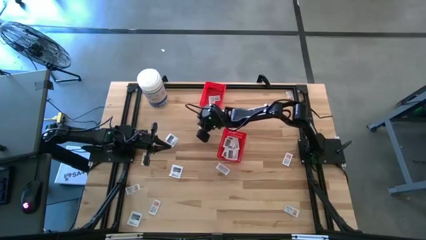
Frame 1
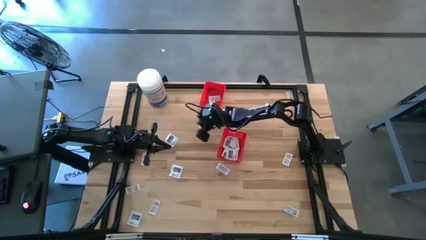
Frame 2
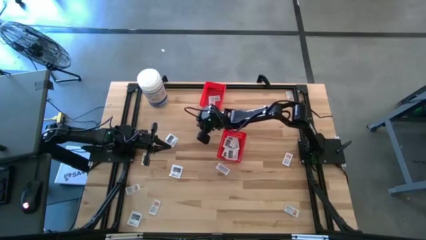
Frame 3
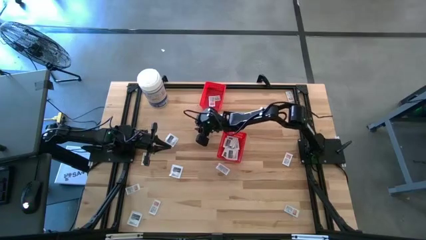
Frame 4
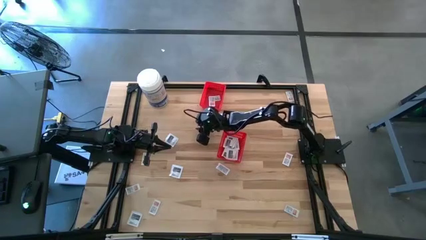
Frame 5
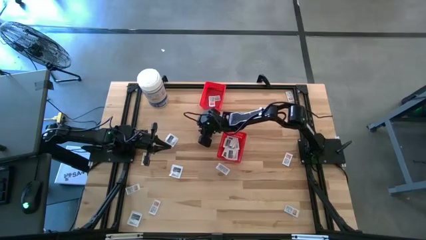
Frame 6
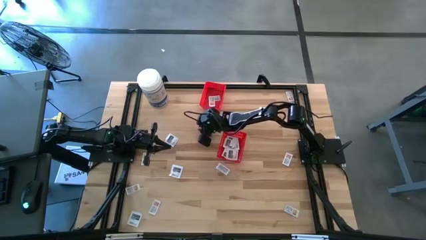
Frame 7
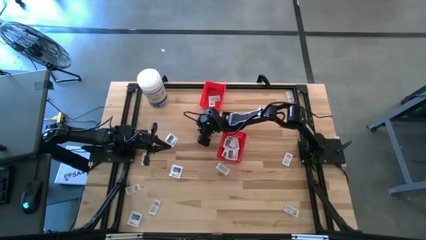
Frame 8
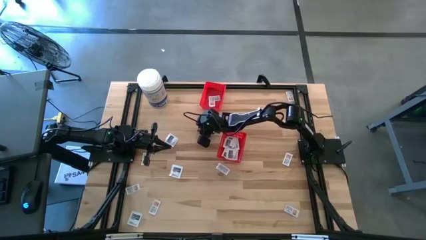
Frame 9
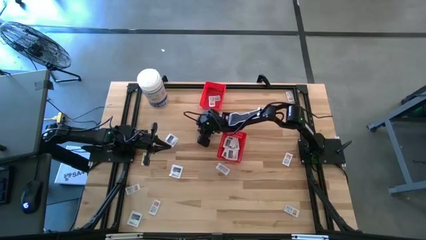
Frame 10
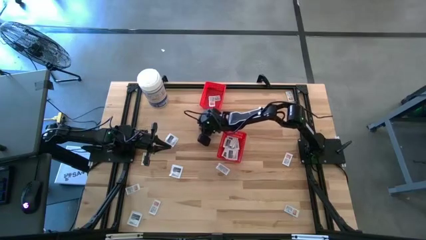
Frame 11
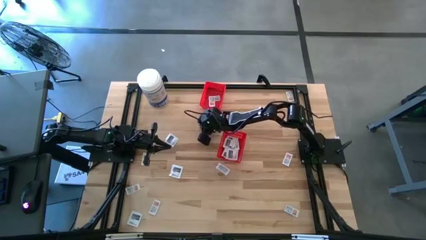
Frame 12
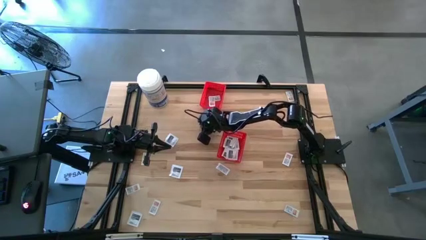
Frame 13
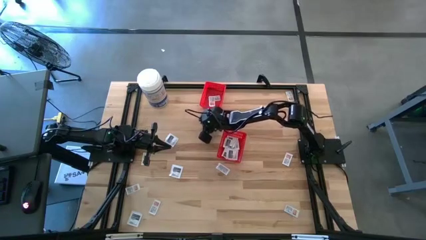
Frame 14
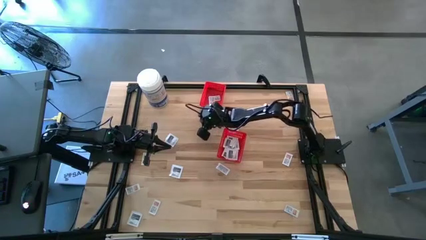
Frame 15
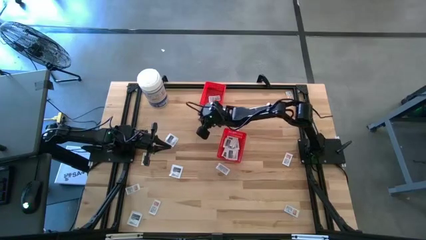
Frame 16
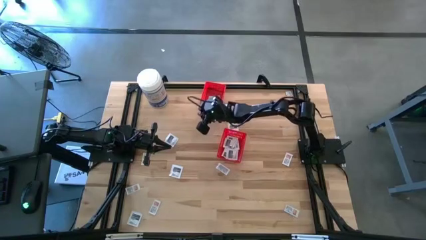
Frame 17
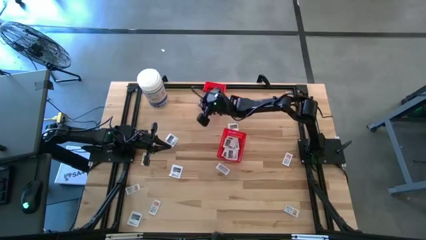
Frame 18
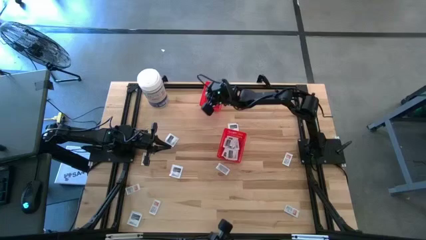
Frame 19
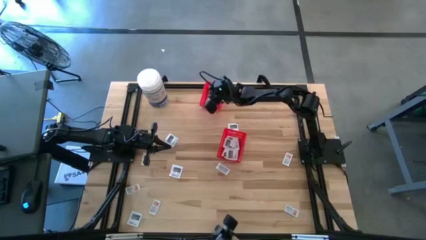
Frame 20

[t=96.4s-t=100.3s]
Task: Pick & Place First Aid Supplies
Put the white ointment pack into the top red bin

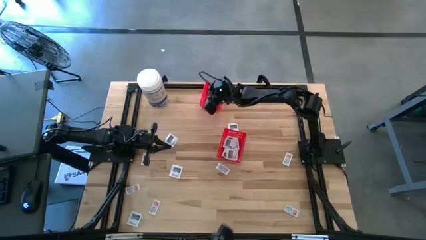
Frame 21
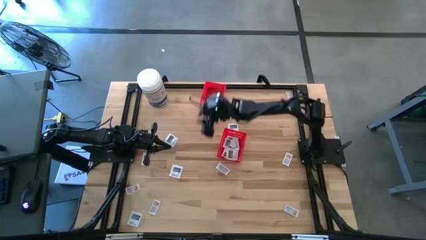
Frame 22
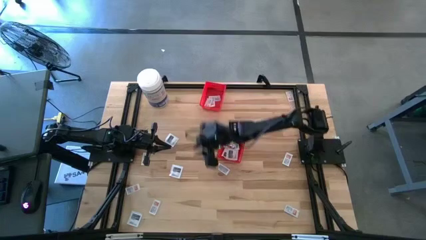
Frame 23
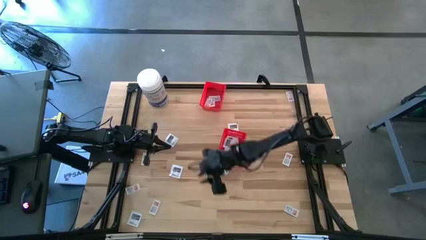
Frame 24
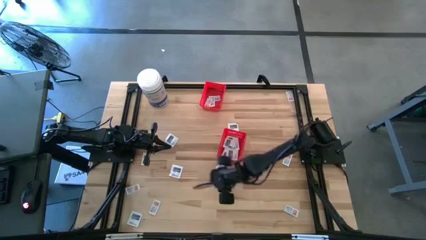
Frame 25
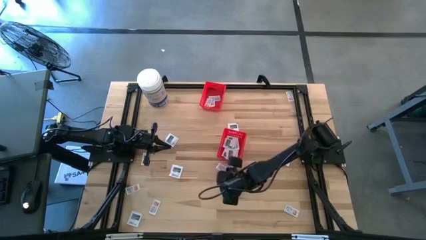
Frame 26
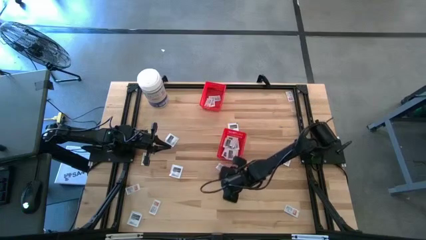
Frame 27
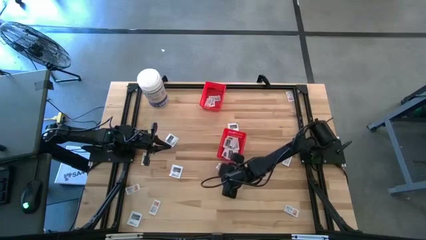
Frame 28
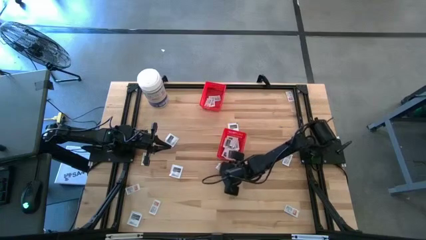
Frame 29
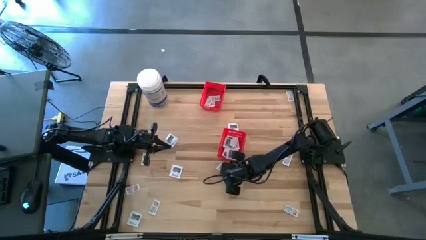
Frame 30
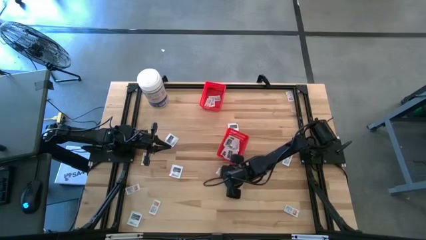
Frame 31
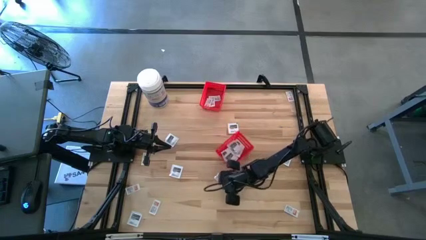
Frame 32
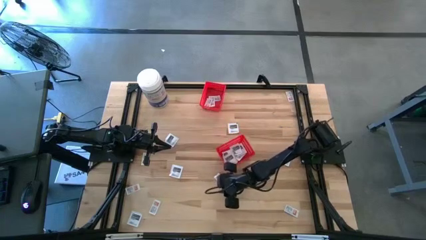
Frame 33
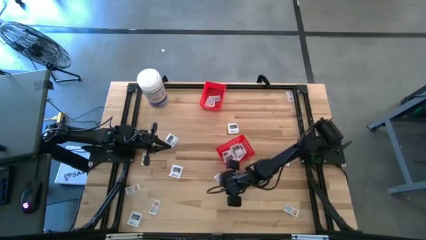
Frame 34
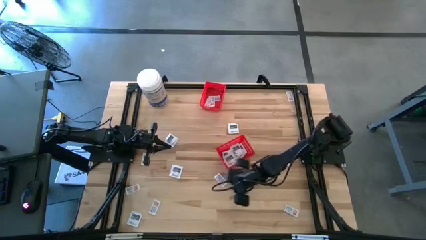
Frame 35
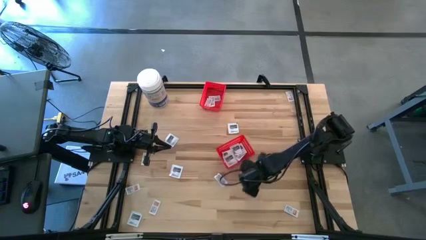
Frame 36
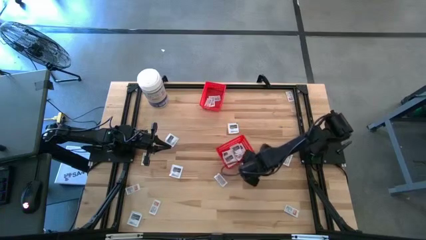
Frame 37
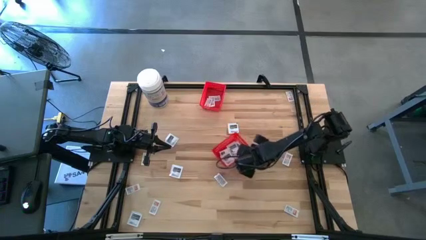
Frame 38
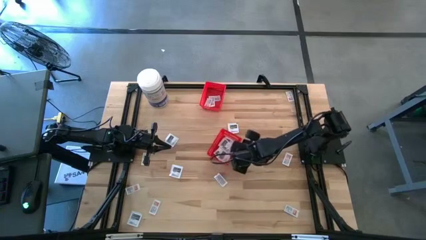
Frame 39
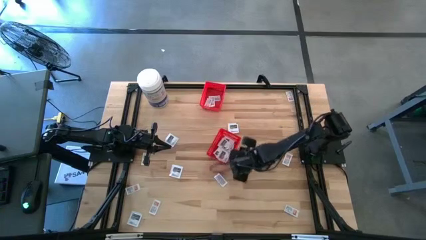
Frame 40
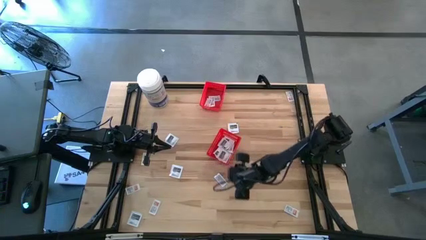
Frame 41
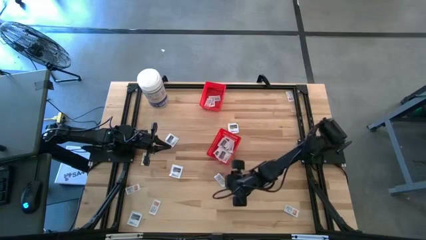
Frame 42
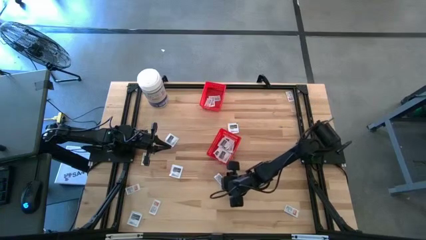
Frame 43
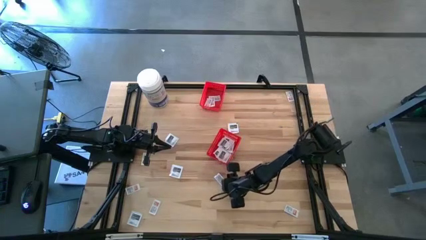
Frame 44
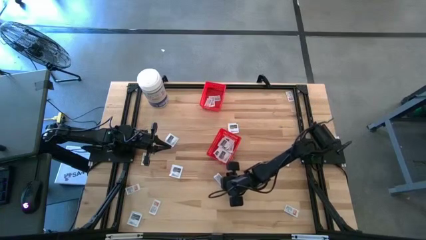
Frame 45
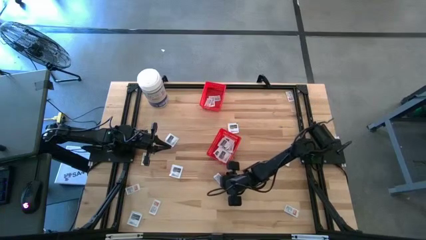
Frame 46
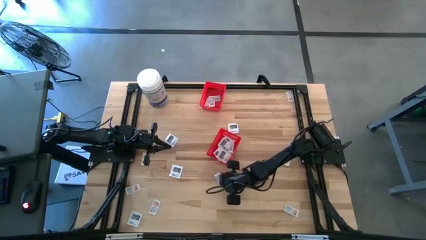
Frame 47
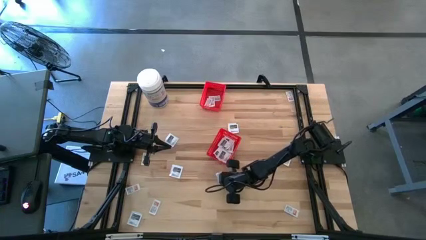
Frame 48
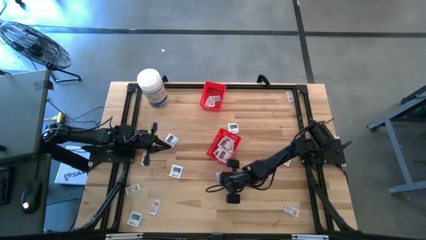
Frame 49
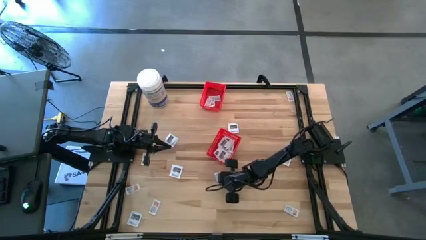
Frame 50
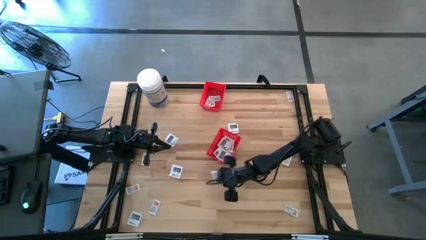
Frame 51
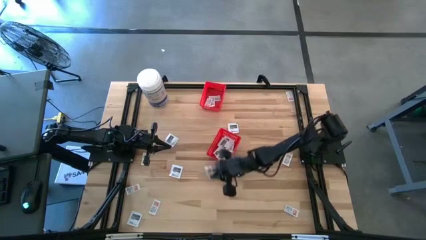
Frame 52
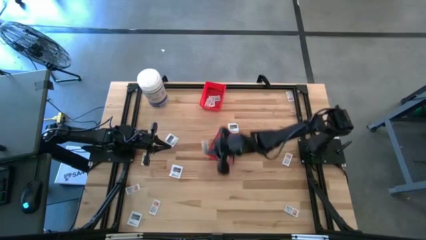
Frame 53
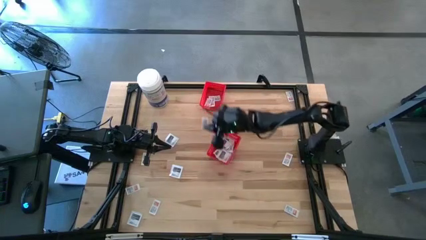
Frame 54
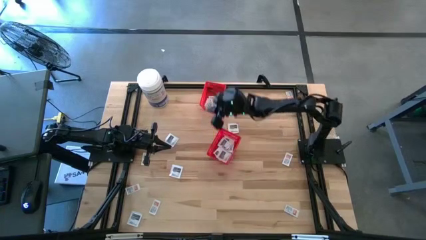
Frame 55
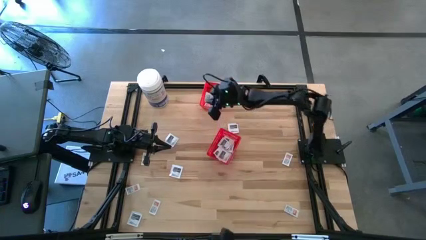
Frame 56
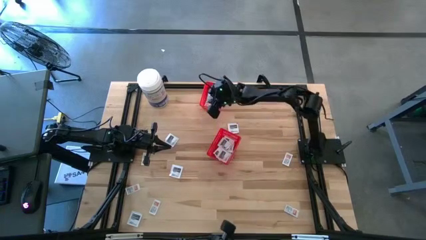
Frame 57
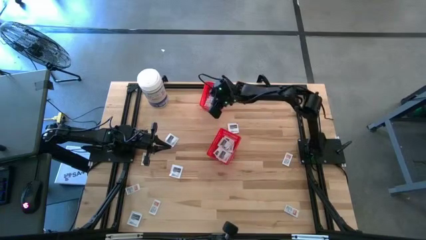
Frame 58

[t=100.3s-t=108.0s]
Put the white ointment pack into the top red bin

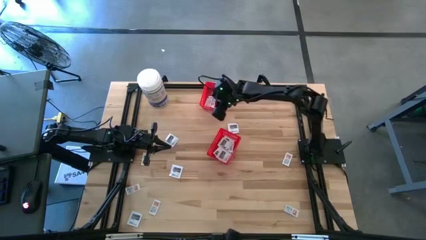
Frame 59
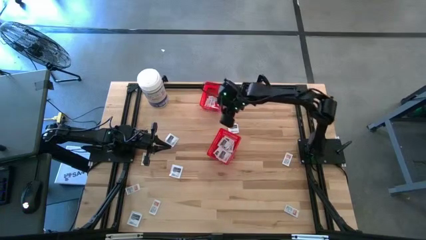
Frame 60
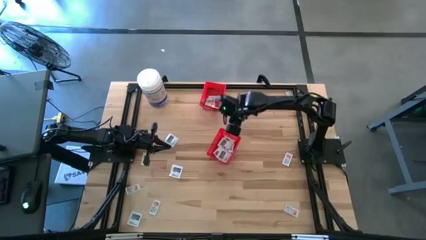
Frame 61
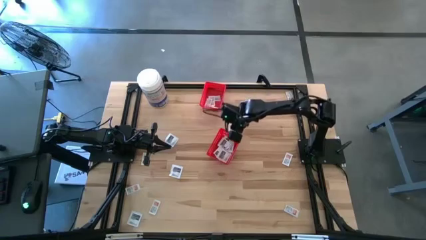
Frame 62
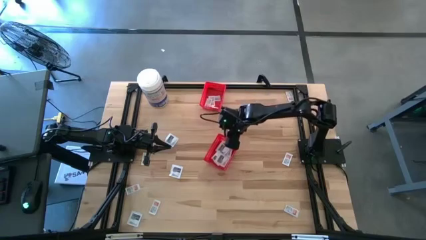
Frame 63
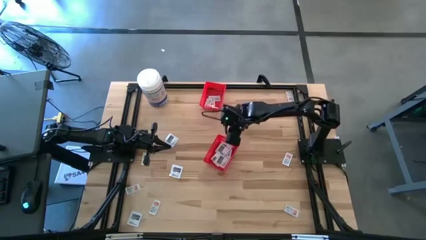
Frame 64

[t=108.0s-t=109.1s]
Adjust the bottom red bin on the table

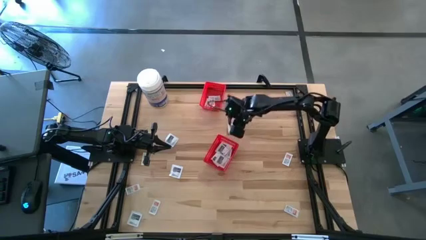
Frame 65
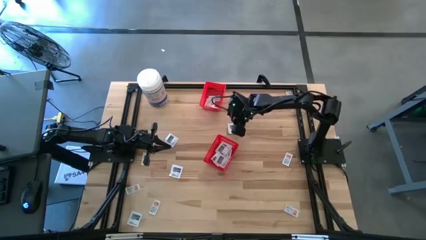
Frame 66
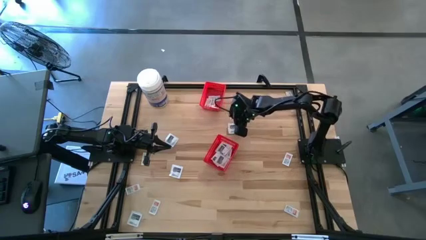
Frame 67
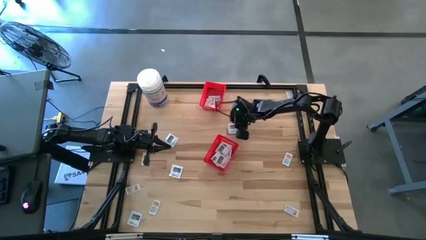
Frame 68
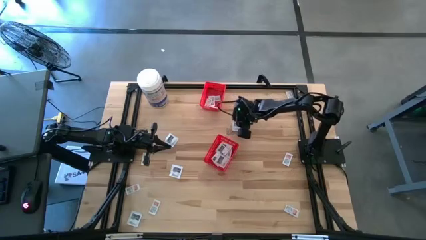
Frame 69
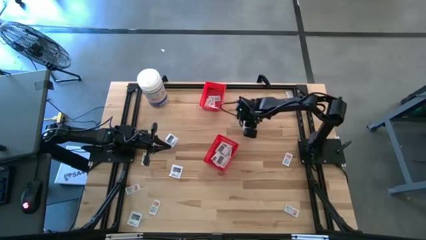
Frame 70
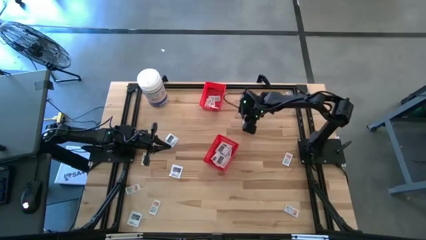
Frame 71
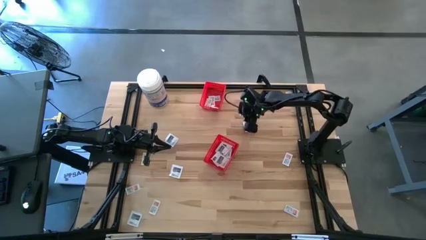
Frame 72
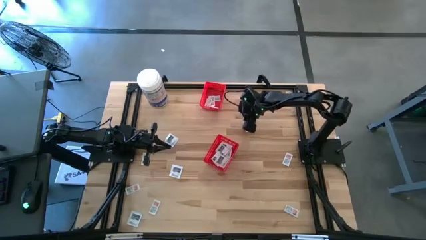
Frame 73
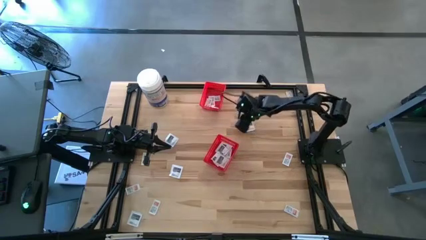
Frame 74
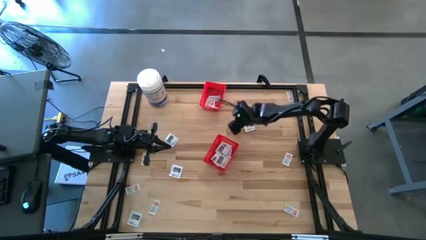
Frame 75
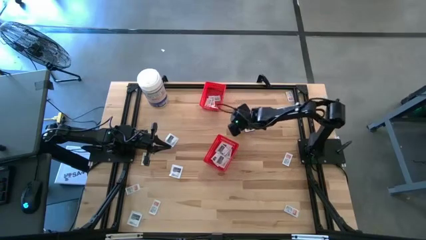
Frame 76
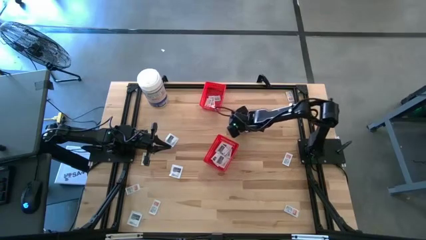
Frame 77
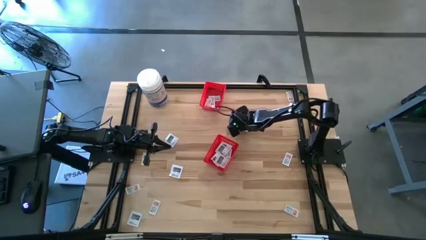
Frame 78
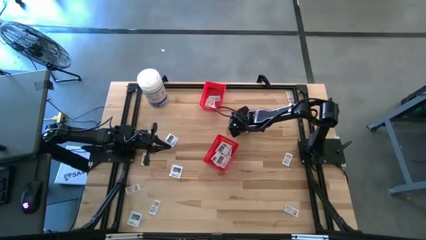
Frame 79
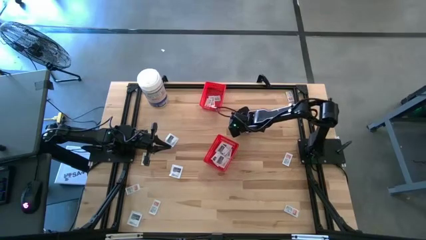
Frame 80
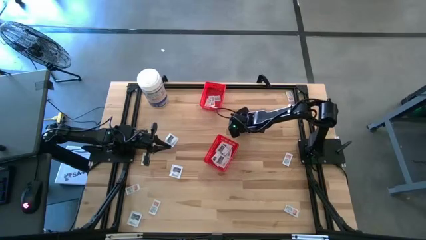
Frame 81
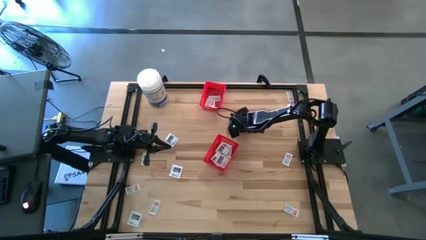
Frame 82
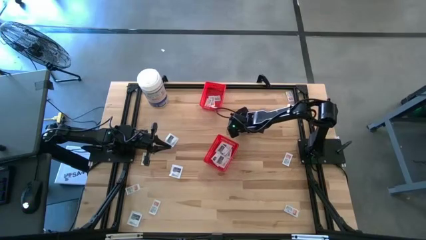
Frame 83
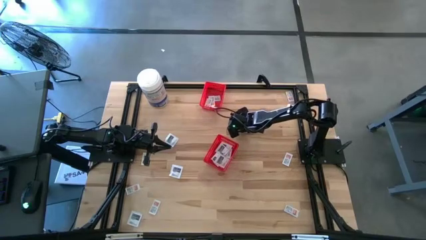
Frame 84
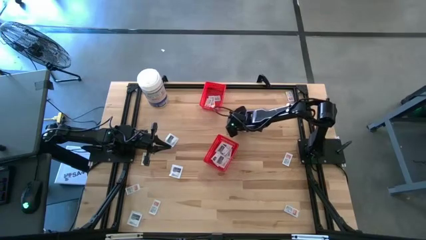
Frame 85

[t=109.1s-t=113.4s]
Put the white towelette pack into the bottom red bin
